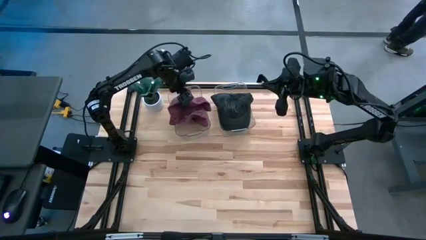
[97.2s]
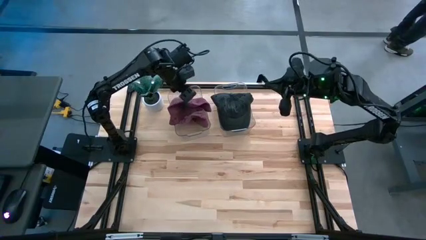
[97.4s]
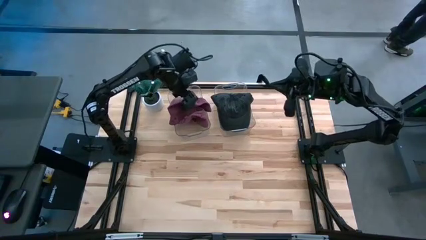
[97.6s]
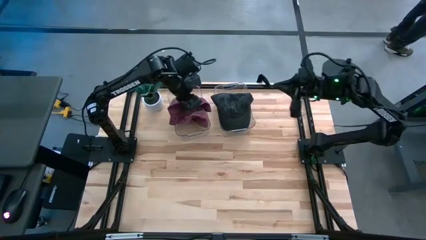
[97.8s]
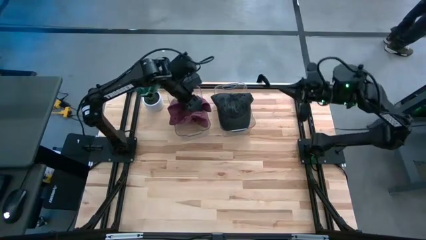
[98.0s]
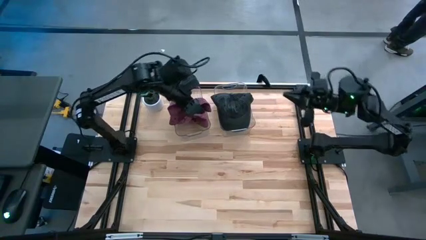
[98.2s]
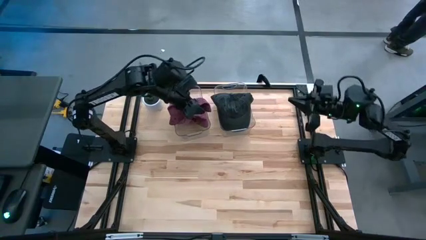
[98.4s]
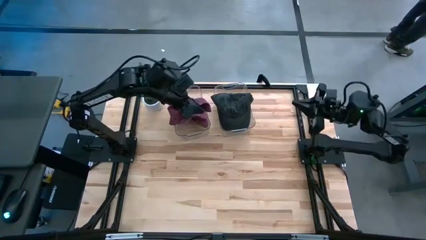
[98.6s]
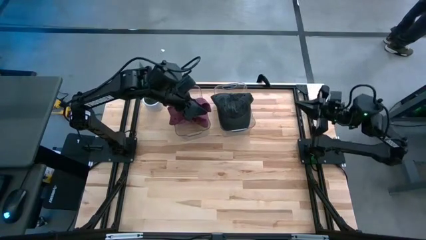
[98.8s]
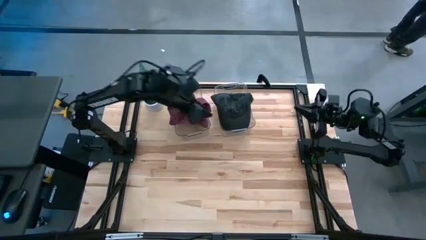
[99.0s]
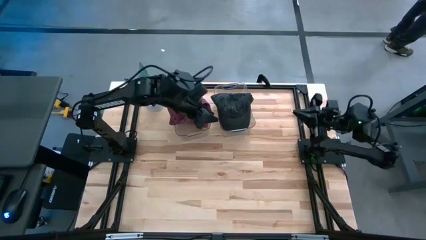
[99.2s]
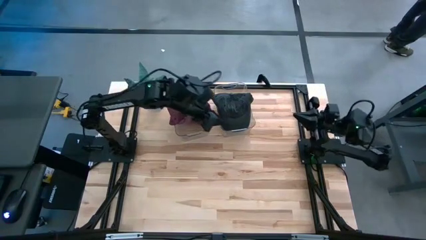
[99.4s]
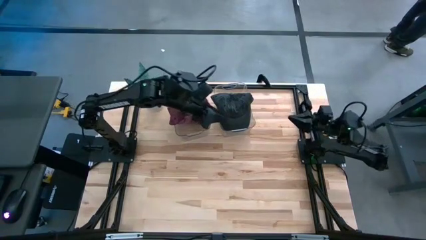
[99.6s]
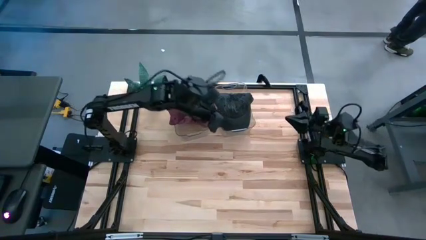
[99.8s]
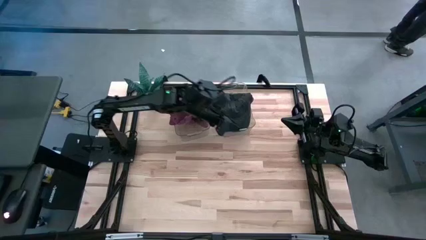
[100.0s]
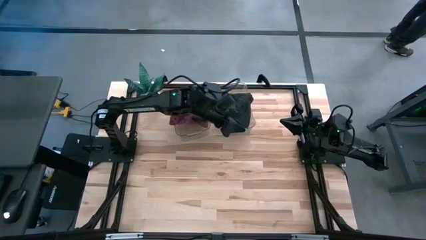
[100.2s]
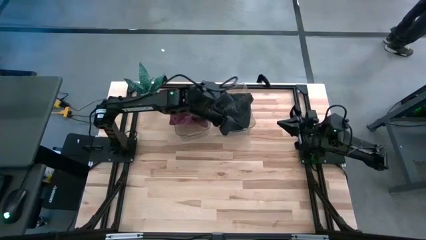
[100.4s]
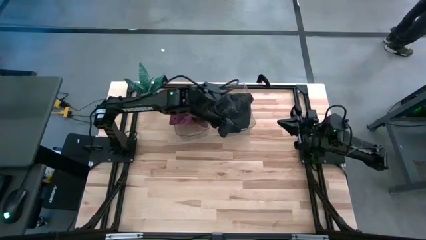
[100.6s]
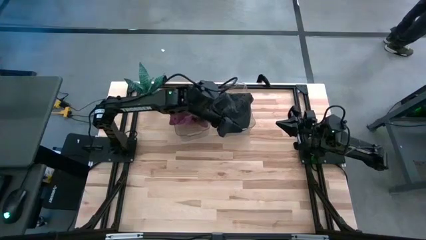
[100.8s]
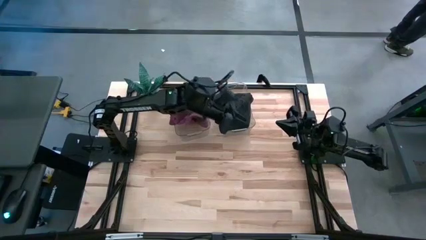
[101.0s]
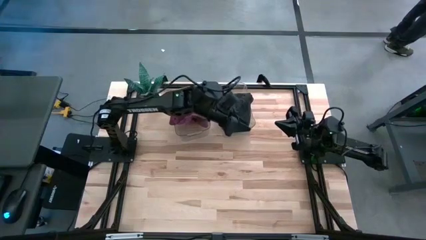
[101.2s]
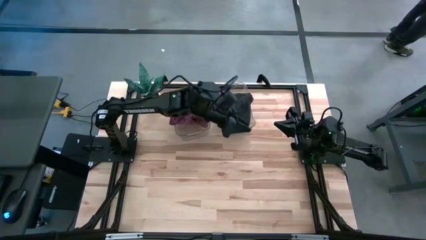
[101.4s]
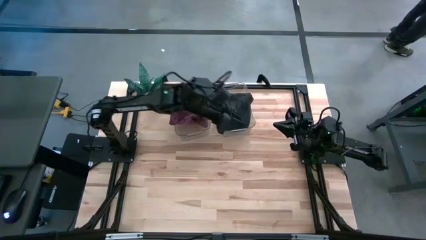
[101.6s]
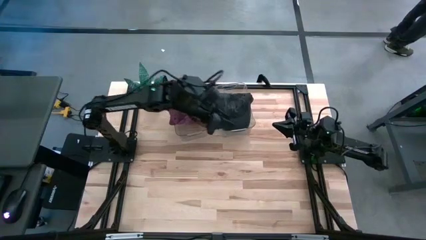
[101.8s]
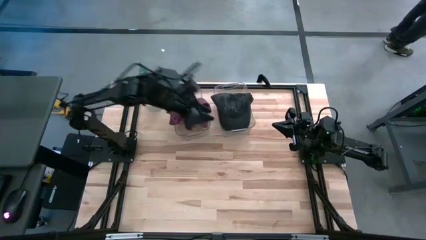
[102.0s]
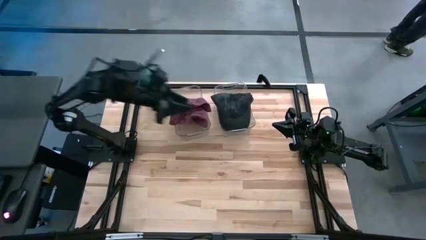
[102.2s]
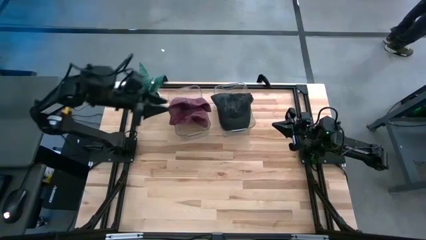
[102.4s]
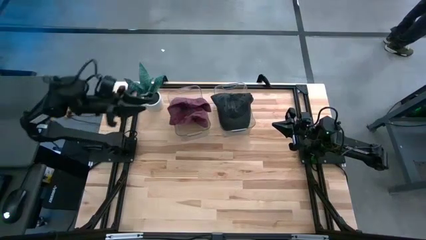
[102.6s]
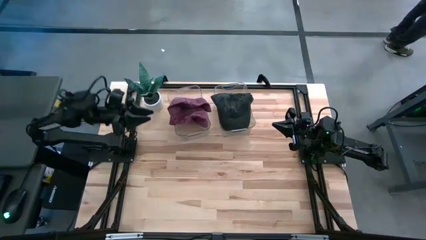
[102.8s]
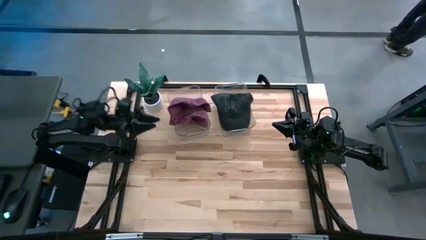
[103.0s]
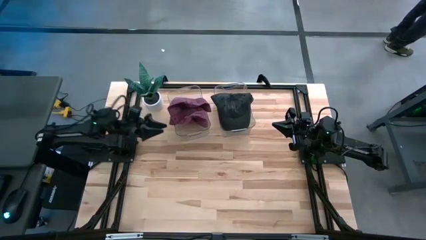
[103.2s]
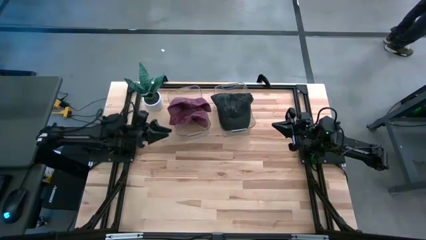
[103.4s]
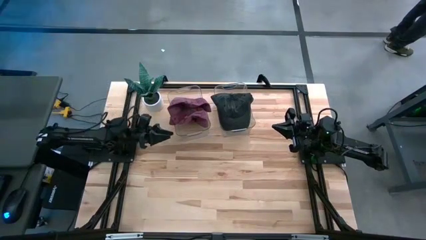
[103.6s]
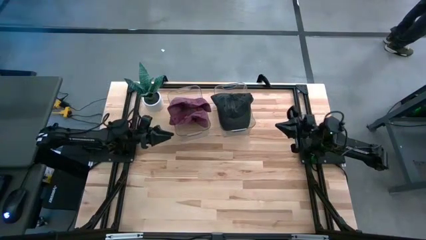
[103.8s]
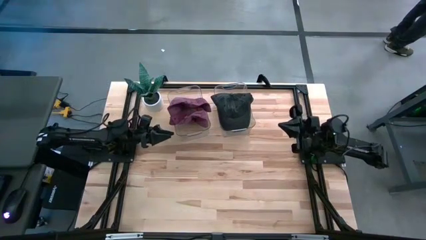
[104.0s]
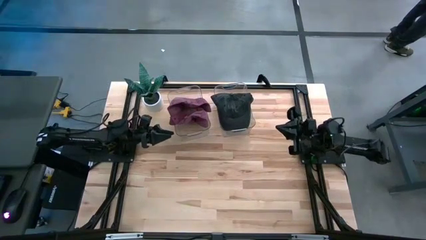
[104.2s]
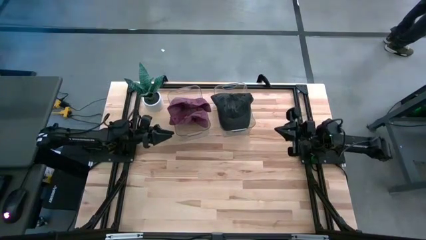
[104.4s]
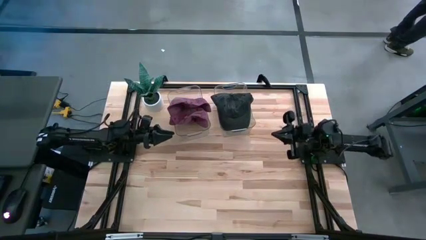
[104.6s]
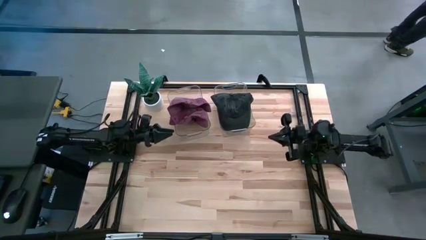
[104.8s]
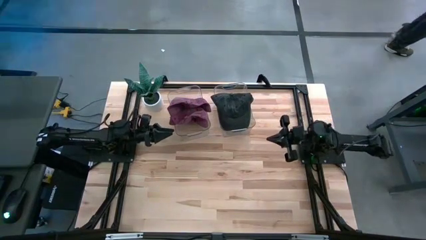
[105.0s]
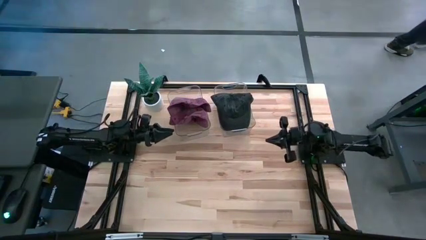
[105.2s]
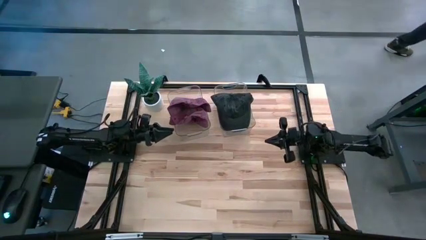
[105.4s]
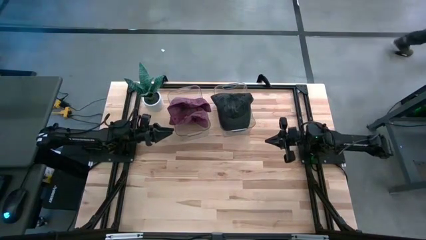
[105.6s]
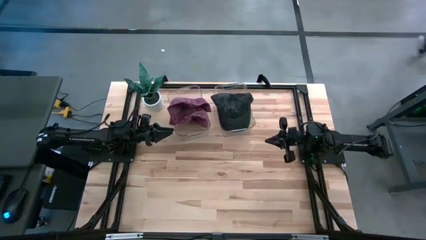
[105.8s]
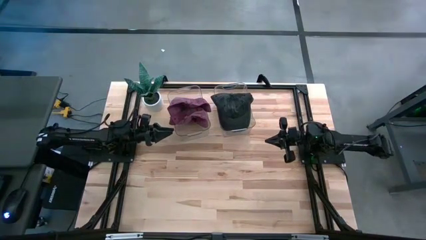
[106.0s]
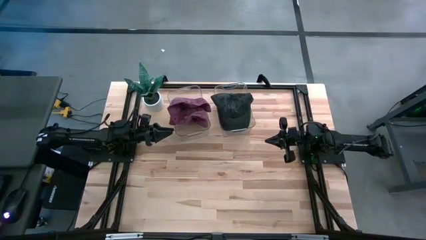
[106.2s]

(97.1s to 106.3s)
Task: Pick & Place hat
Return to Home Position

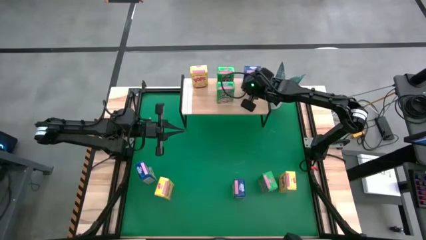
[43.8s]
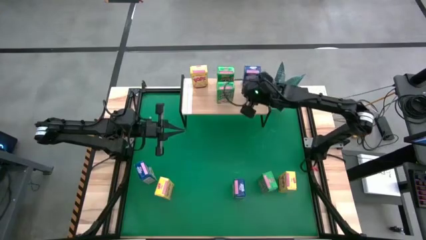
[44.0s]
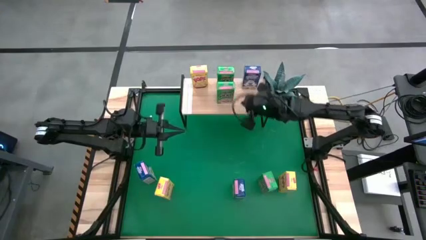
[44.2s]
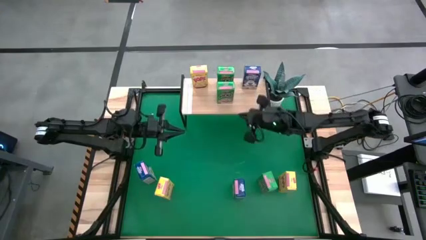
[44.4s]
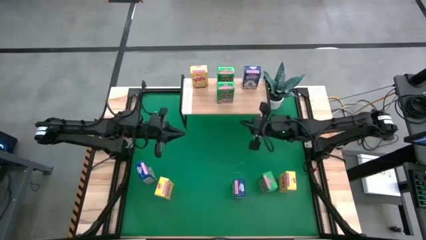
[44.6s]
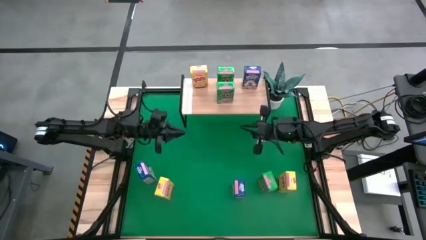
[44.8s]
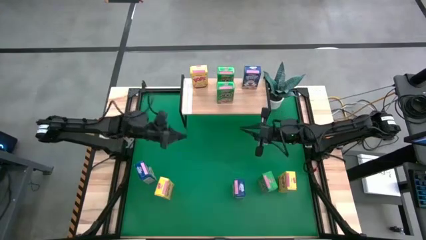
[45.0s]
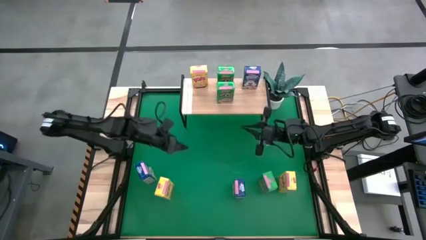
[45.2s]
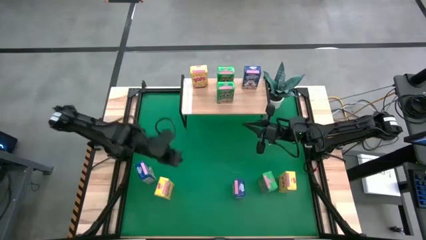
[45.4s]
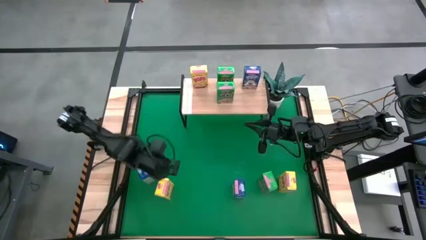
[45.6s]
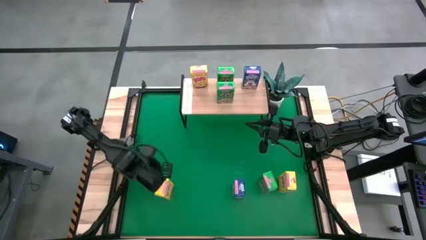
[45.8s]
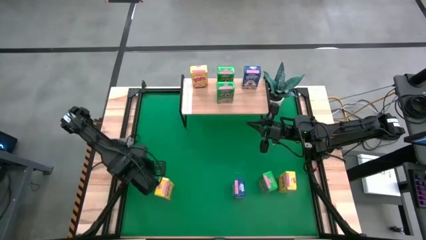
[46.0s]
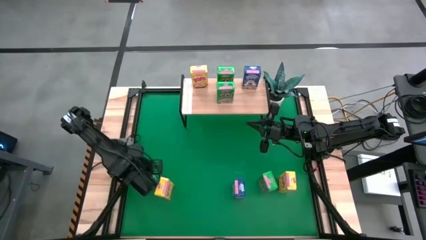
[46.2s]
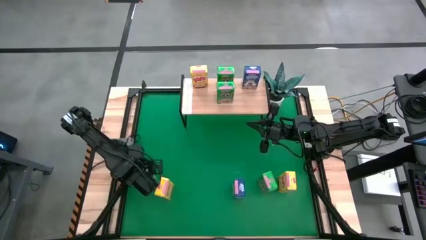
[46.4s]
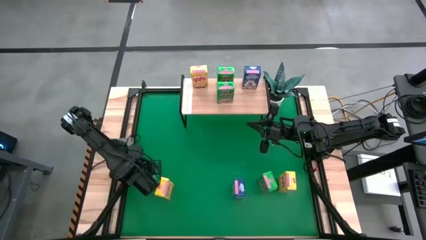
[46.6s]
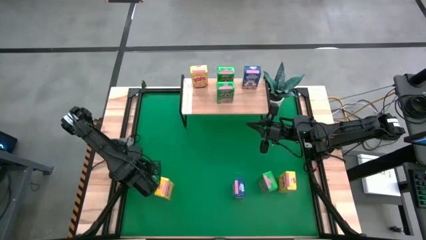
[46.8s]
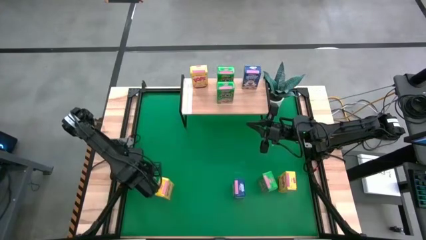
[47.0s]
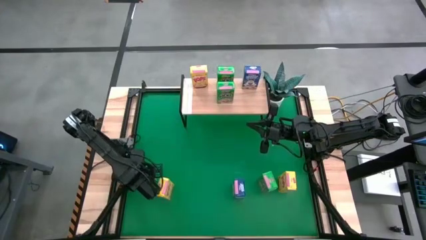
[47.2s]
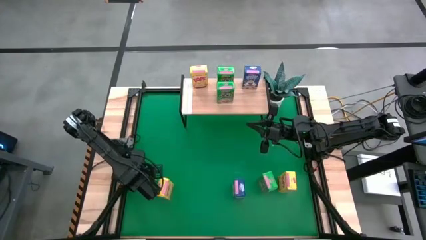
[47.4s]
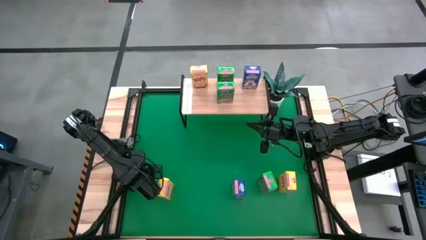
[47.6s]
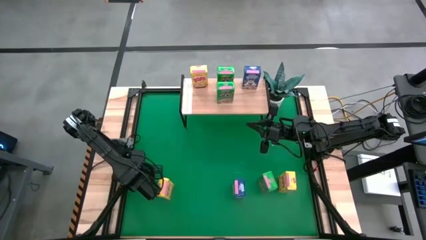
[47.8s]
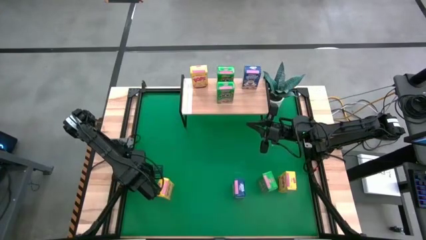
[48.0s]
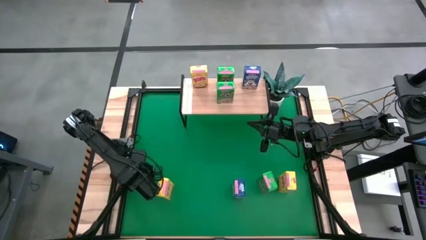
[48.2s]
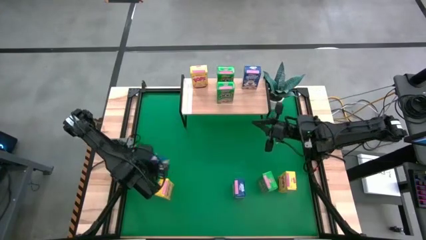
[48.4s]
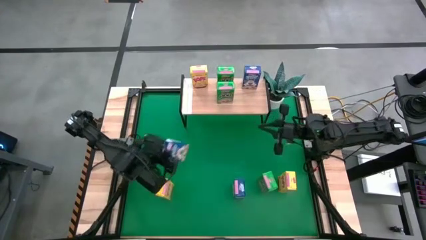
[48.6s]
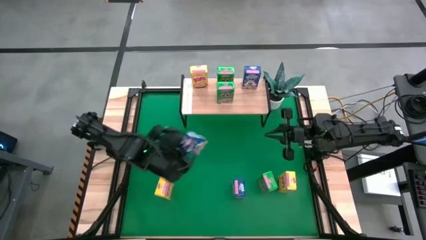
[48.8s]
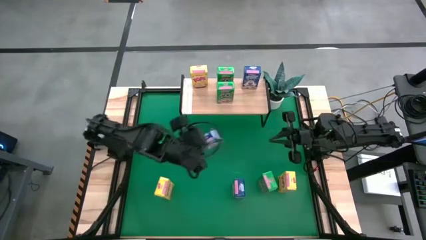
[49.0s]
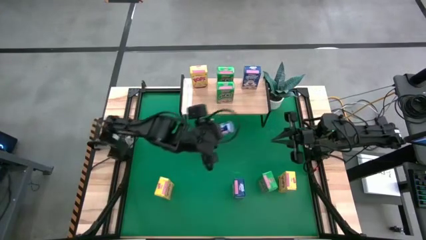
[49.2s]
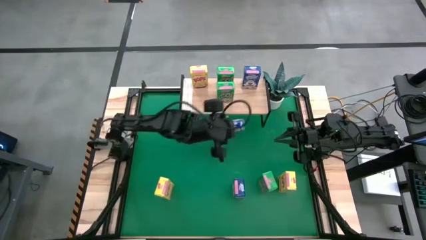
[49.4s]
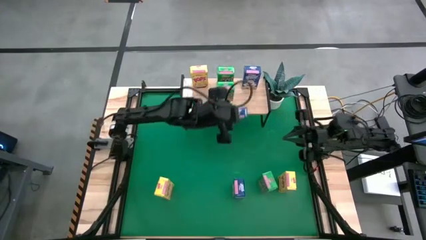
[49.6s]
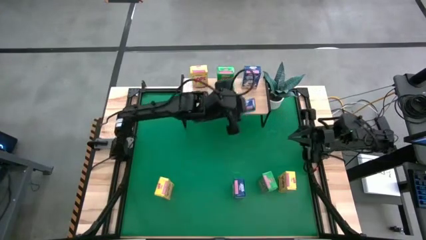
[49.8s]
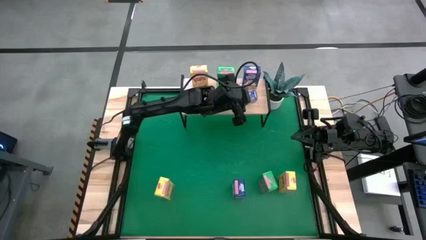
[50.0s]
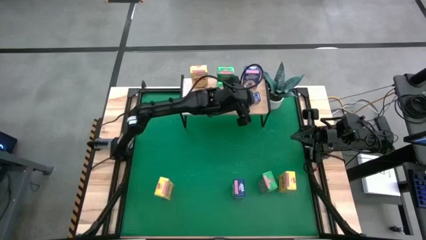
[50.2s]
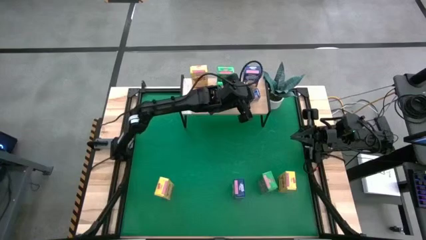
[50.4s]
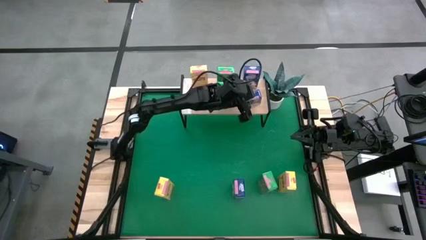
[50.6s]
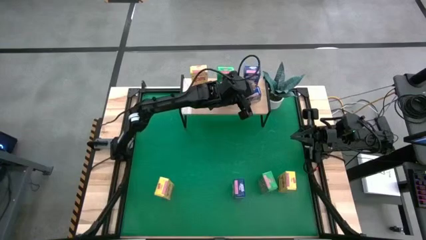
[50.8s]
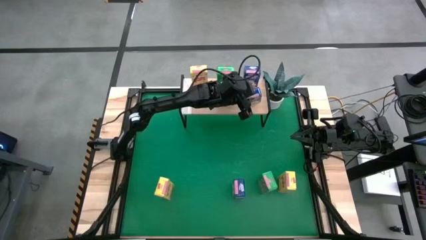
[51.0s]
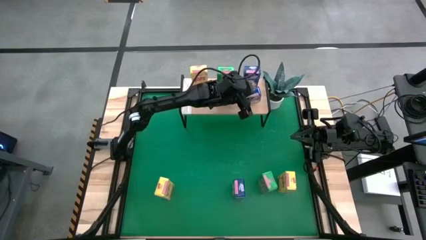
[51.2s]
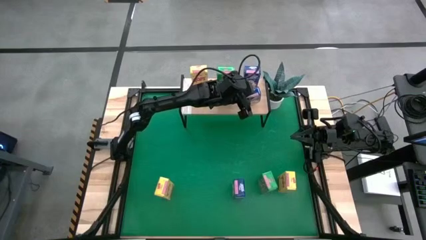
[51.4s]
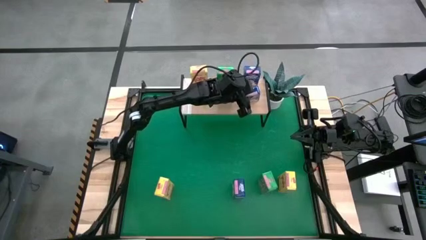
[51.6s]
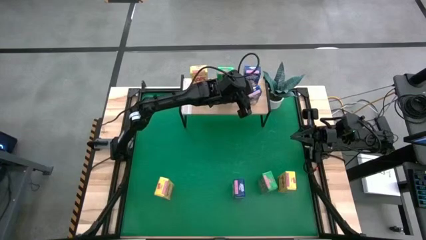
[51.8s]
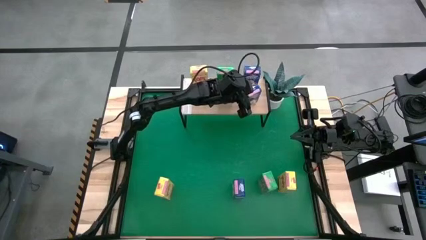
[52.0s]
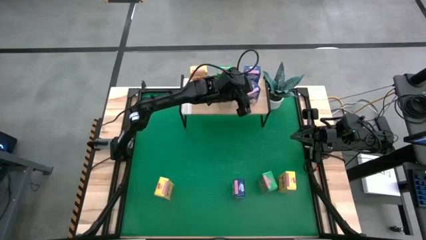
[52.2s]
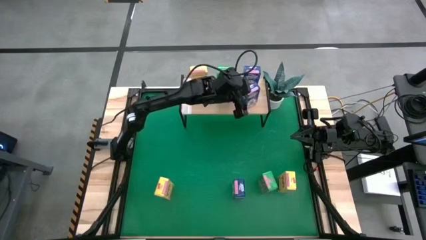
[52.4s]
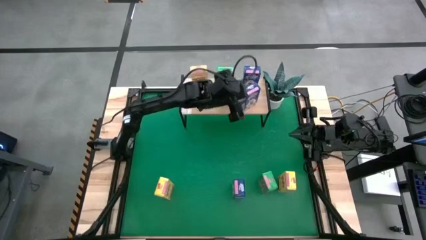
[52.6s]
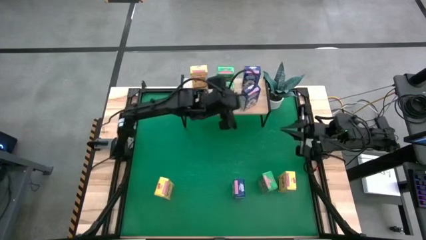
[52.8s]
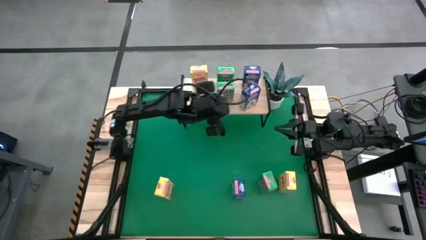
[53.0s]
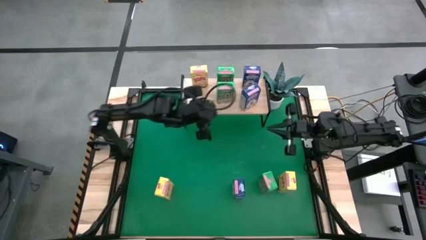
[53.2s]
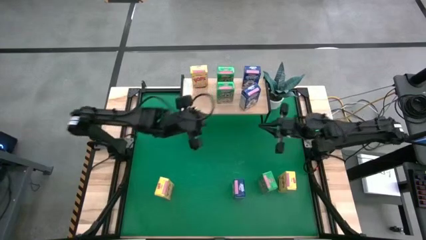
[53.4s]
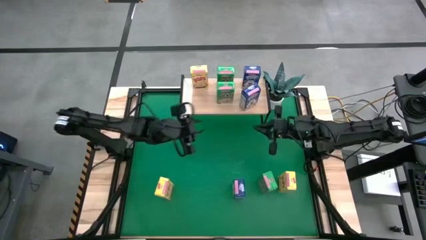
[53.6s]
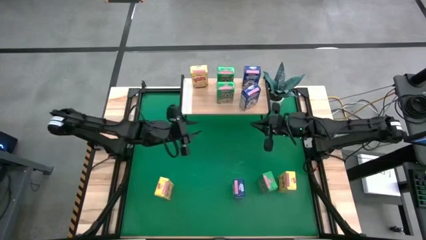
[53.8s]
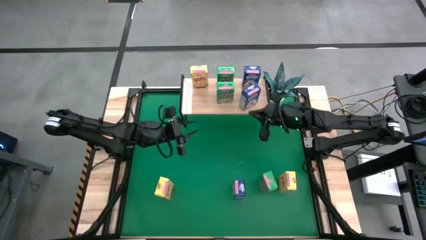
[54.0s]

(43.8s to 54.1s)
Task: Stack cereal on shelf
Put the left blue cereal box on the shelf aligned with the other blue cereal box
